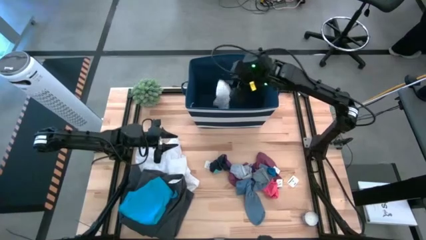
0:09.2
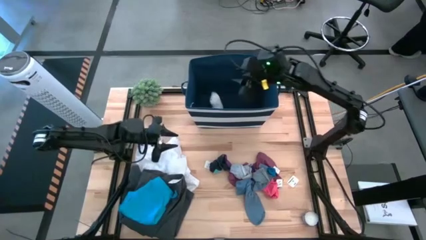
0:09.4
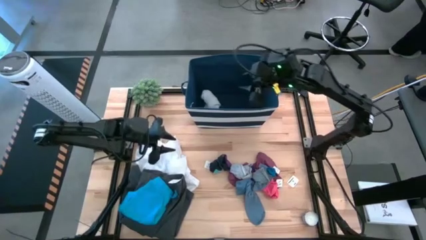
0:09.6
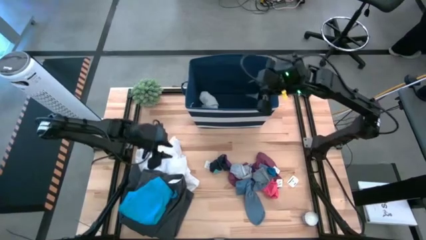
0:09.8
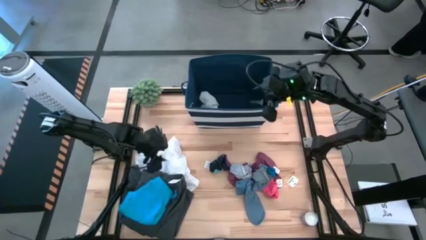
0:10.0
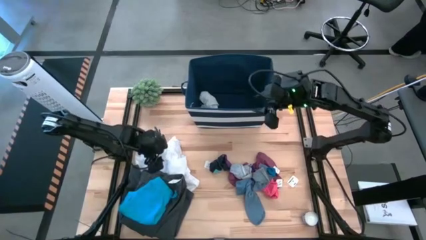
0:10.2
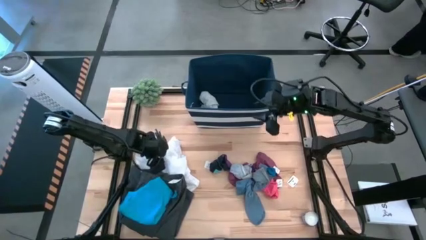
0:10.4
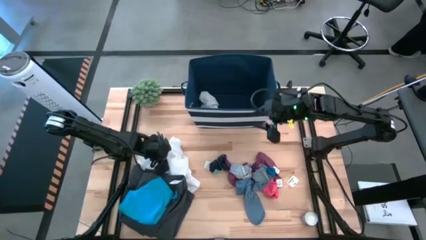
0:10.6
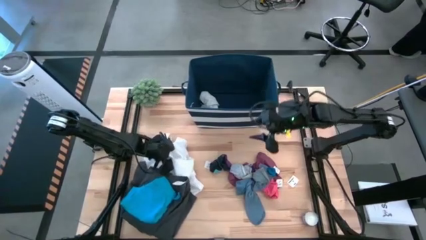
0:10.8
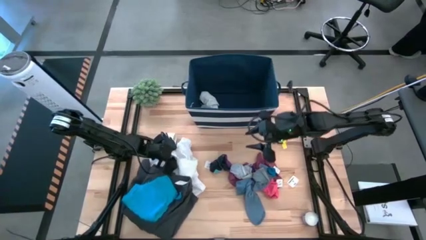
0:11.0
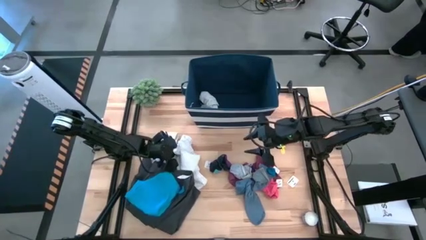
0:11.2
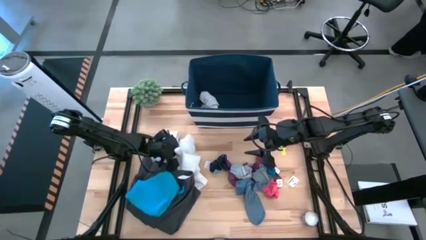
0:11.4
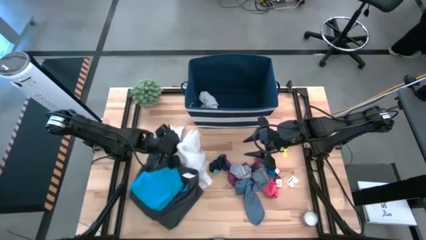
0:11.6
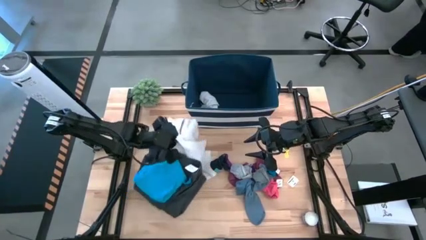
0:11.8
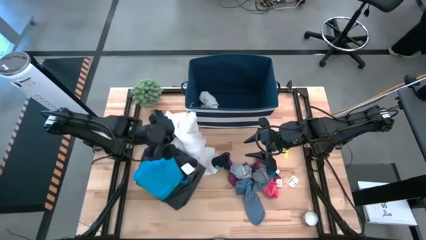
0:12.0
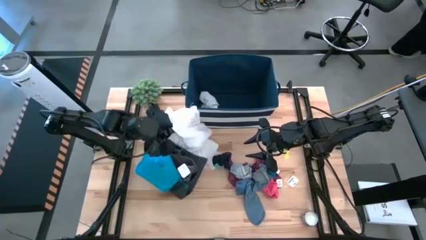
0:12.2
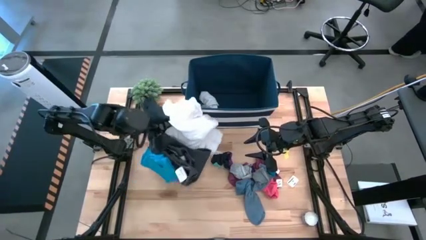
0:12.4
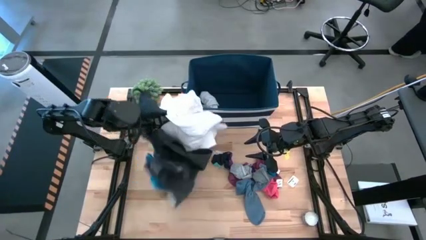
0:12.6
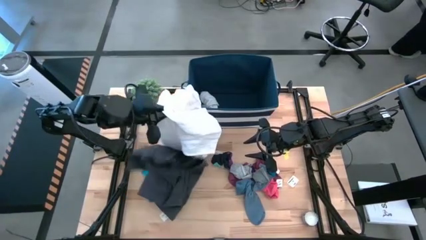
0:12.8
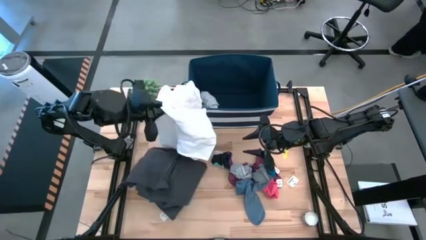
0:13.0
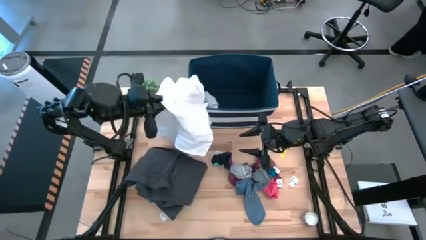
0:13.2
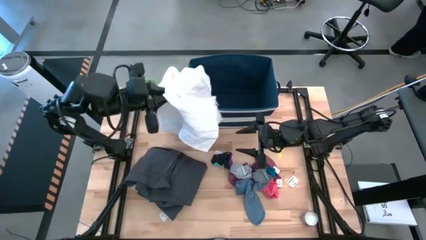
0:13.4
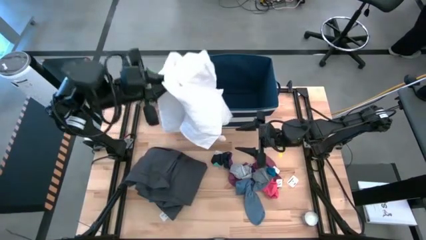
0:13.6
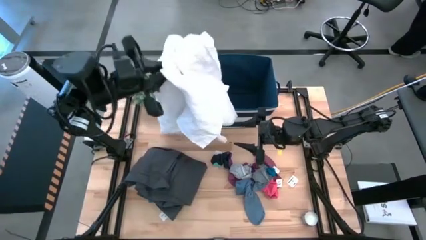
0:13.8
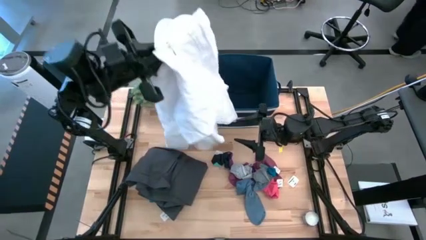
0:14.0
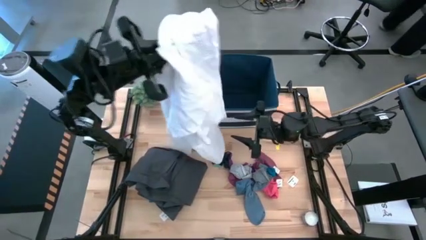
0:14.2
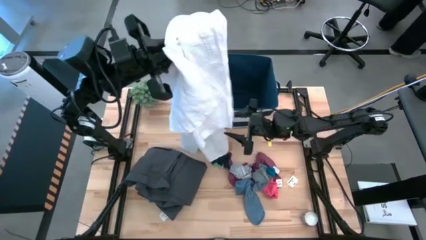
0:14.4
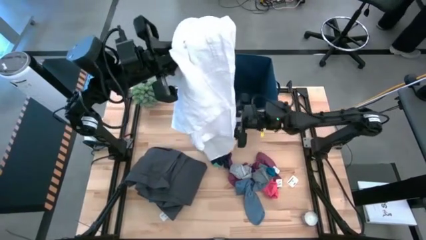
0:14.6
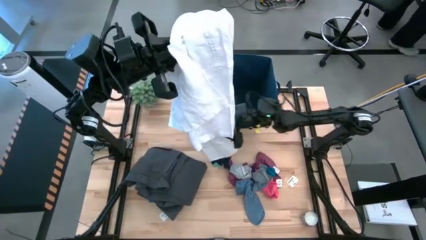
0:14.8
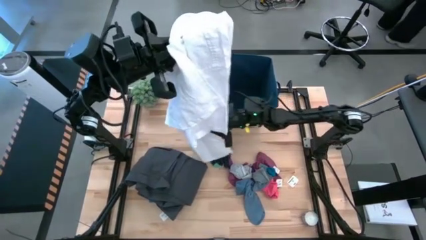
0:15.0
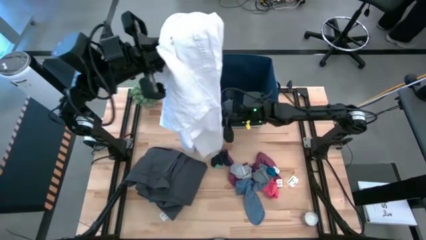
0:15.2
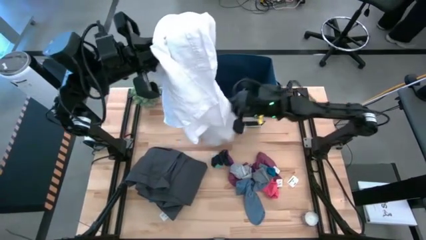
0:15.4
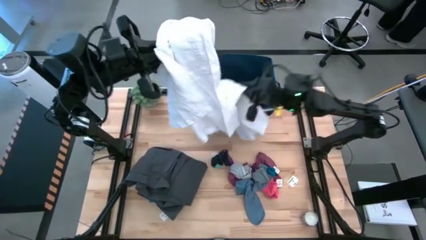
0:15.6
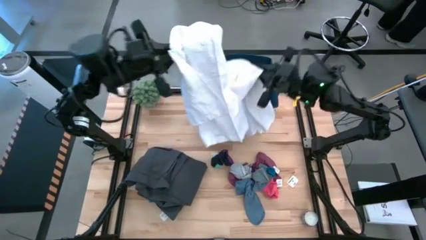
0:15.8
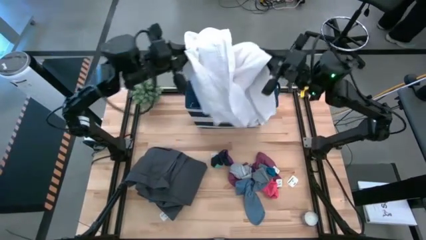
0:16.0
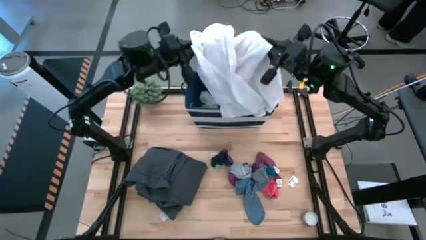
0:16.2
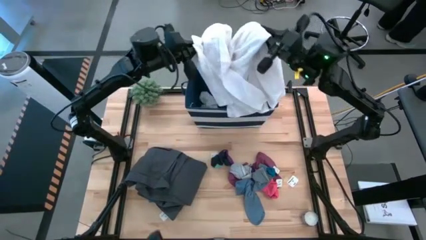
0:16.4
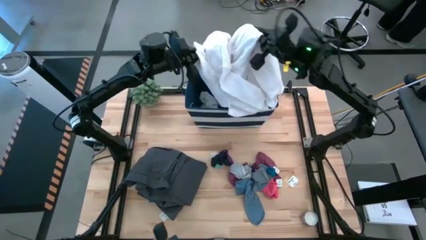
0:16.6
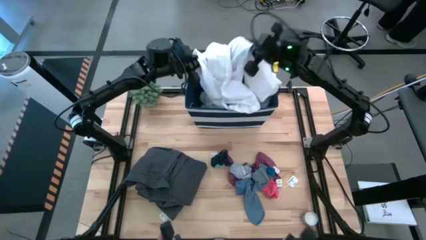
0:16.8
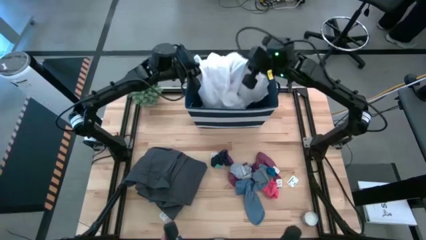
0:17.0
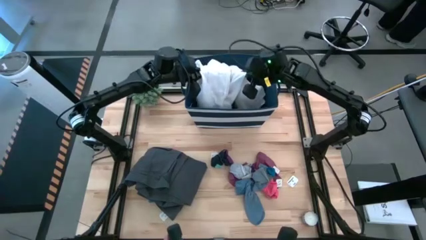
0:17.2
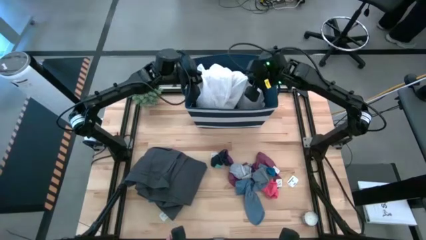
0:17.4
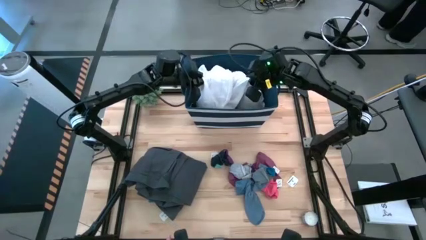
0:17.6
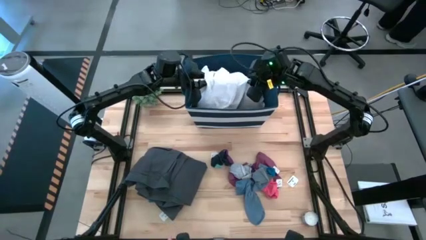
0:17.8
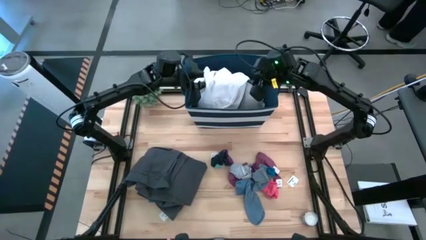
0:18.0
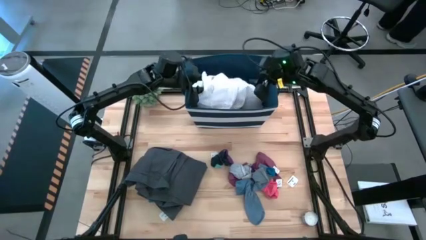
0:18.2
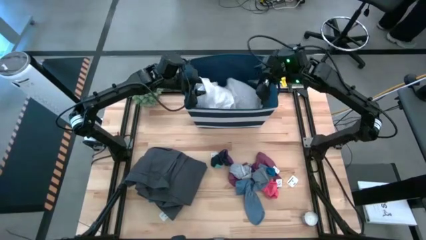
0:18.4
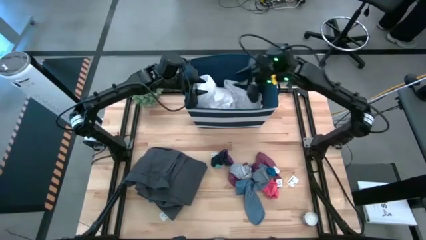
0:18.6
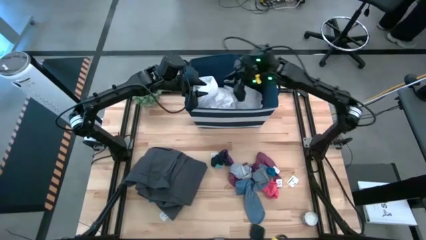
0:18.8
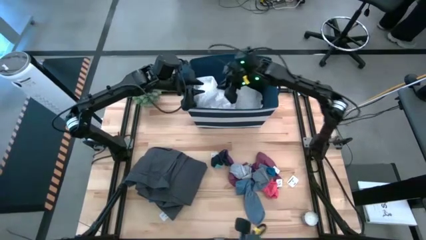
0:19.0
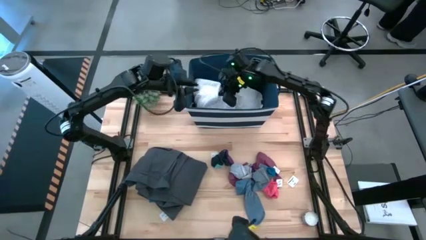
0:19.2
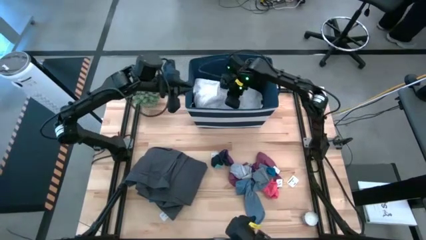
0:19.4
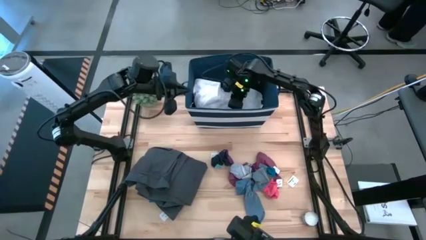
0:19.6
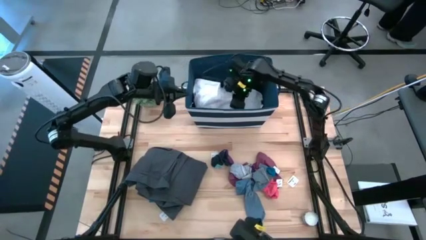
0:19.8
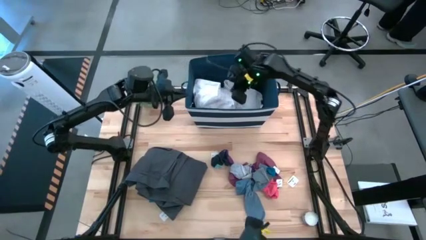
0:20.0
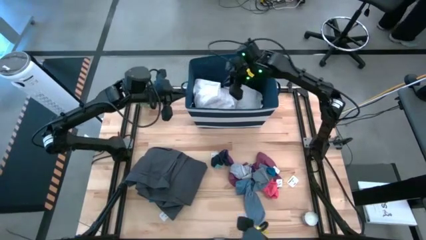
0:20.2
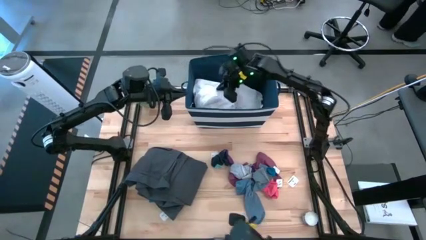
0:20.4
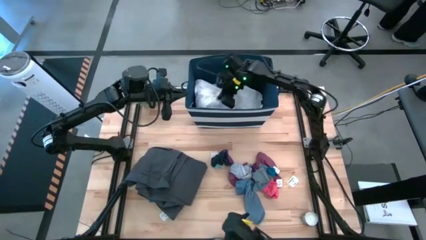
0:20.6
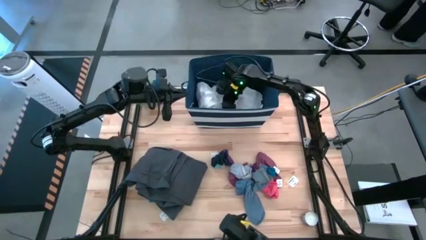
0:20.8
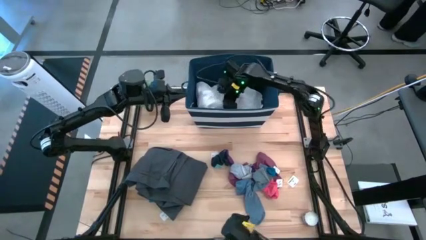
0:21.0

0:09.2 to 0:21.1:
Task: Sort clothes
Put the white polo shirt into the blue laundry organizer

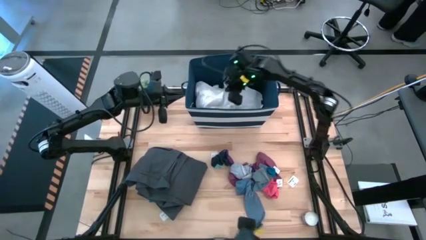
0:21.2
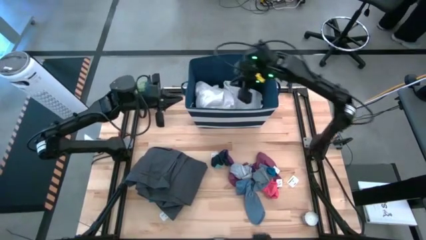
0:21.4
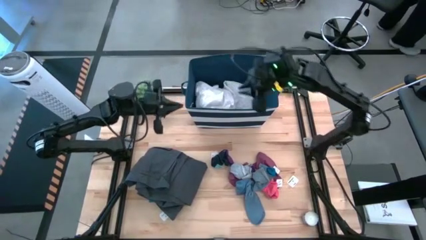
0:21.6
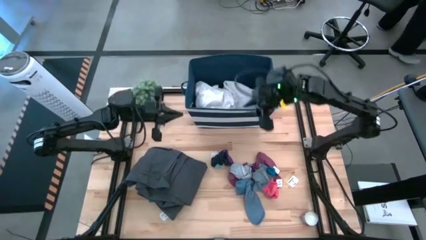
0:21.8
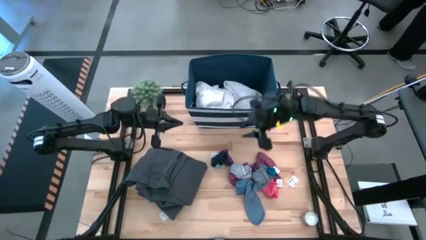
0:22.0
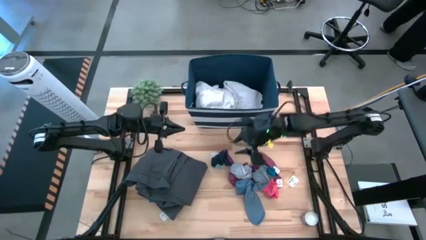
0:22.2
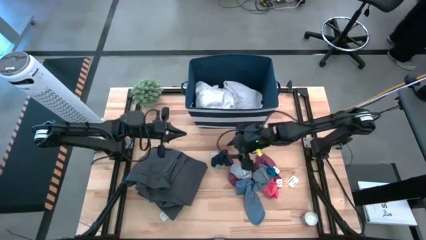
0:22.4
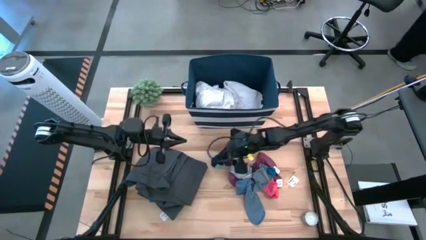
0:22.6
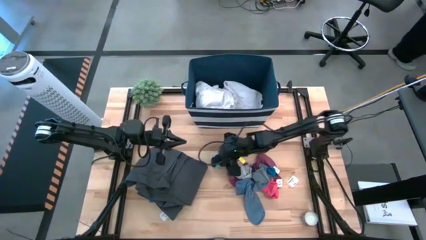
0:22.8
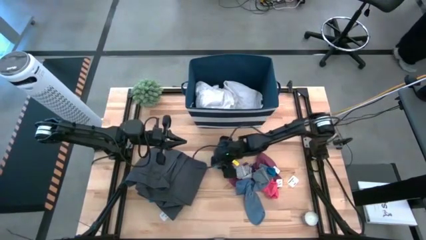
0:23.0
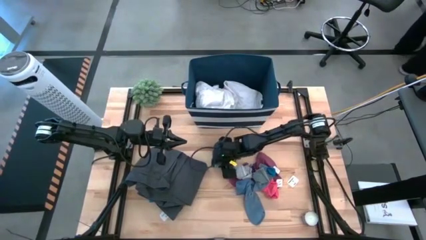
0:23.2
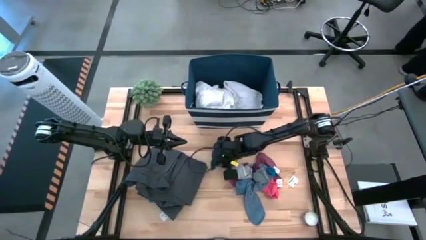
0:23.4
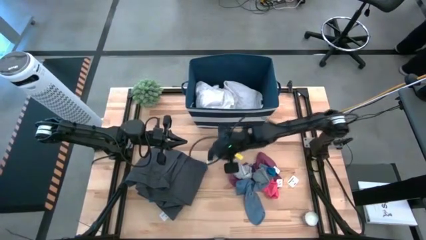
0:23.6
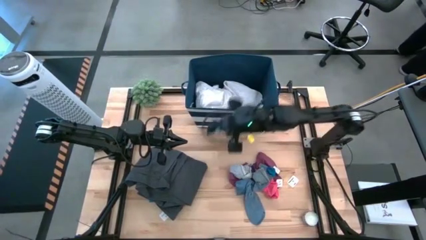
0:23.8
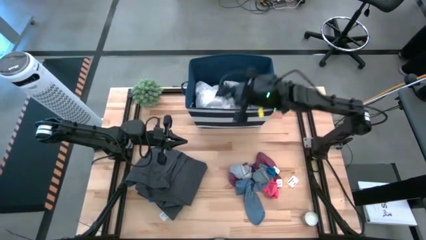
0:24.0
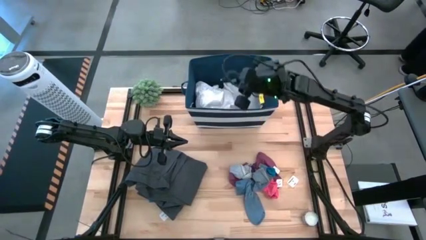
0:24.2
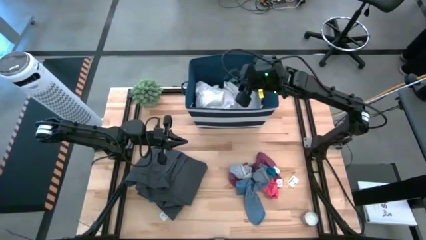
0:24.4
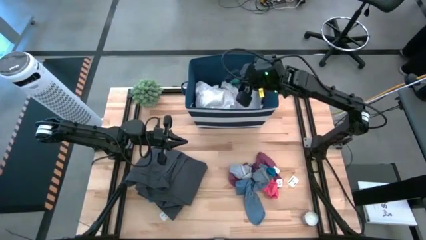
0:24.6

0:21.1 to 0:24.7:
Put the blue sock into the blue laundry organizer

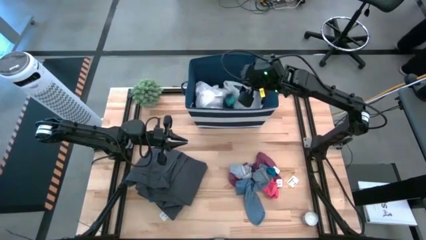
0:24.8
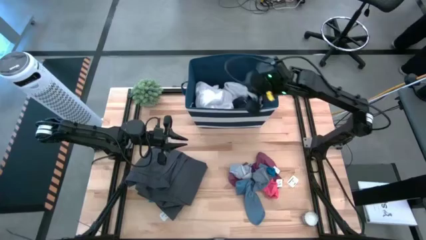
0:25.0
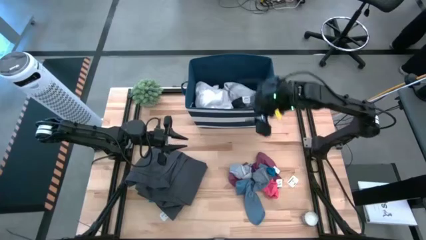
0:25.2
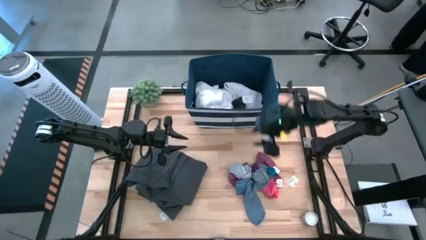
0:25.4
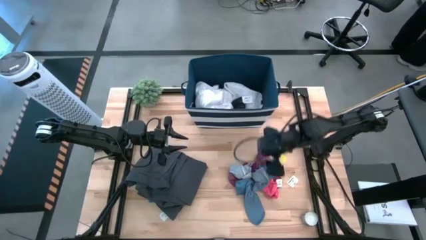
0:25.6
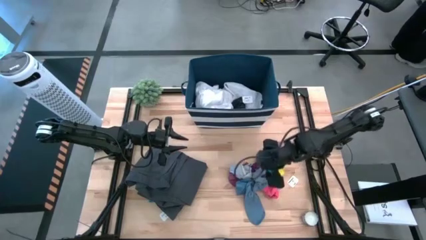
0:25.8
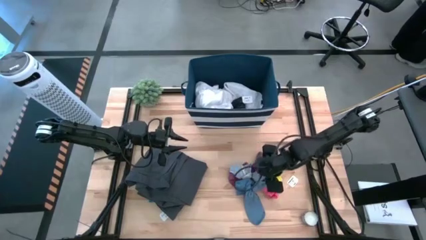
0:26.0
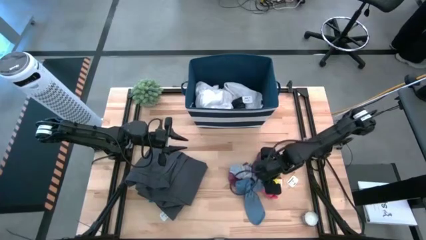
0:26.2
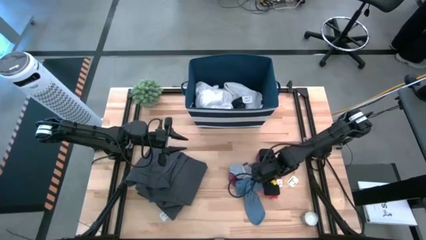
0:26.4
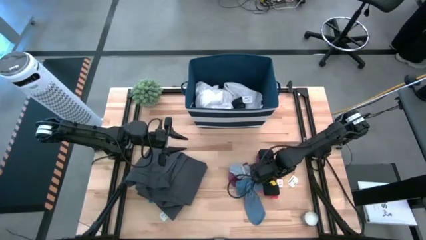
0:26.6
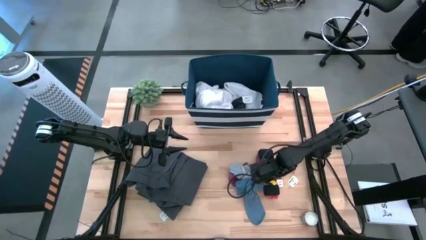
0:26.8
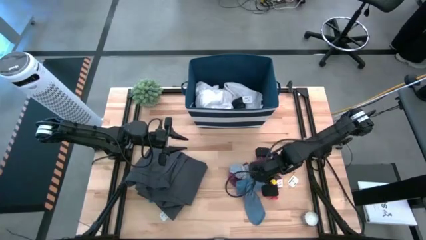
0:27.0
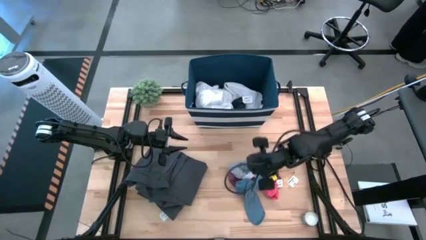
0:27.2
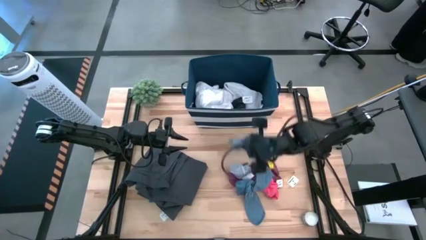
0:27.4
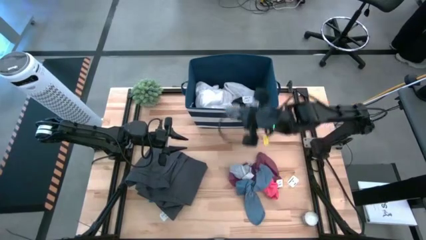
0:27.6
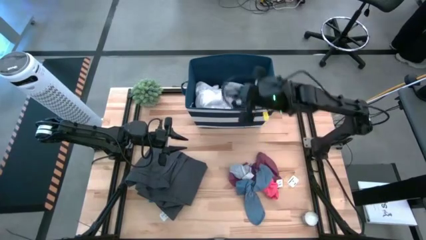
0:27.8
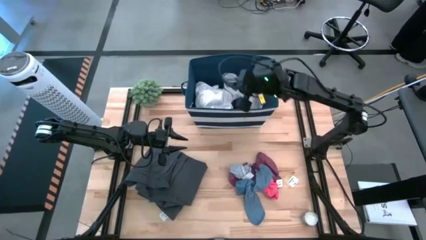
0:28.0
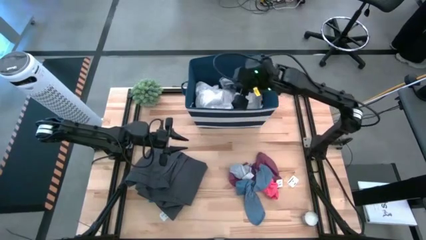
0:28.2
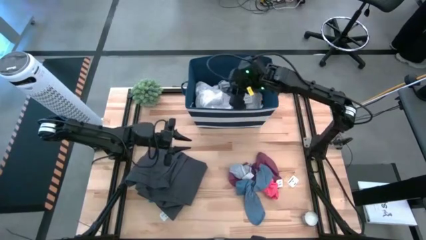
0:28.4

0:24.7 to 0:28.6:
Put the gray sock into the blue laundry organizer
